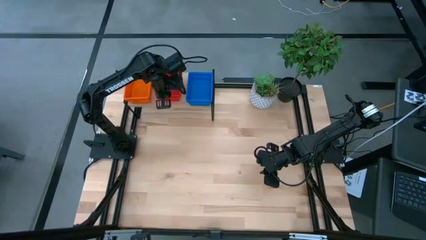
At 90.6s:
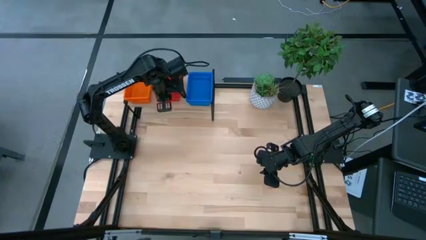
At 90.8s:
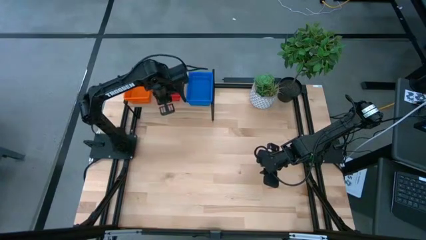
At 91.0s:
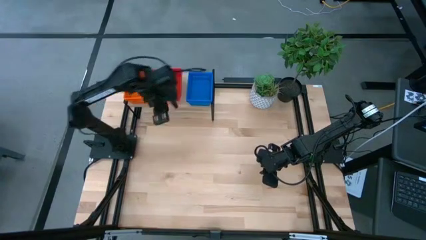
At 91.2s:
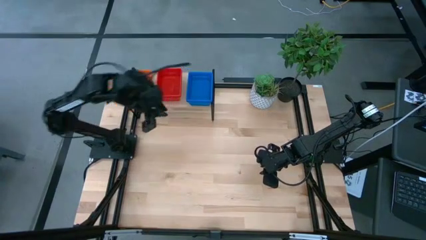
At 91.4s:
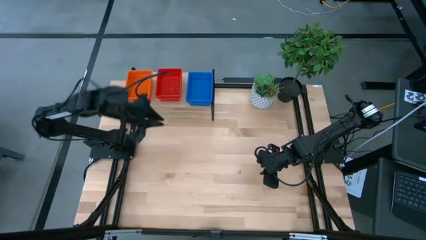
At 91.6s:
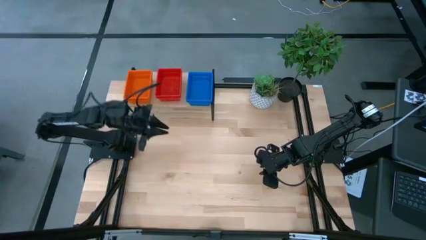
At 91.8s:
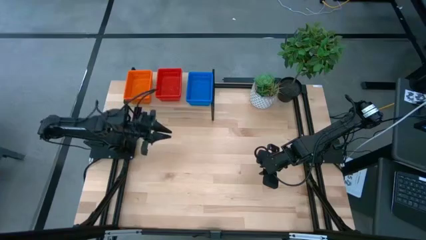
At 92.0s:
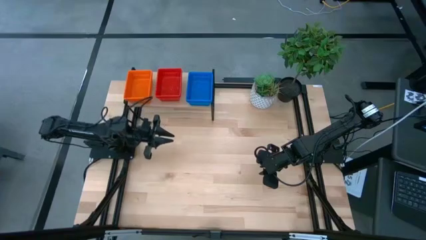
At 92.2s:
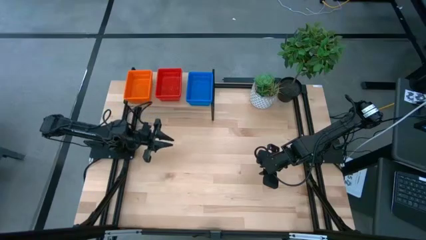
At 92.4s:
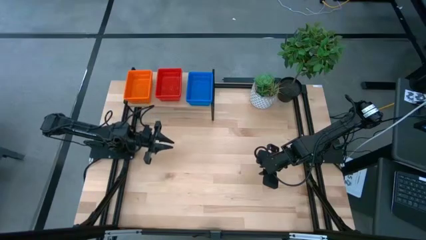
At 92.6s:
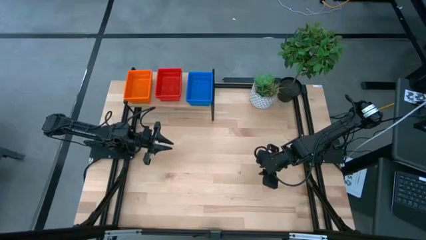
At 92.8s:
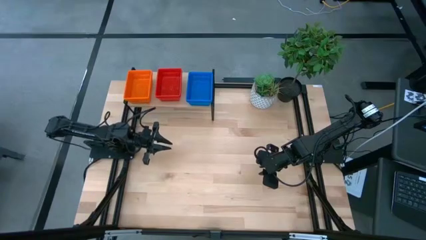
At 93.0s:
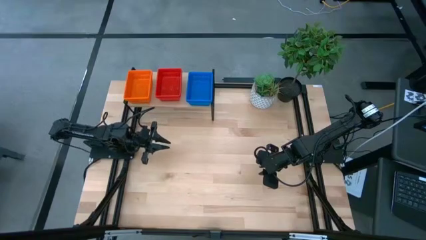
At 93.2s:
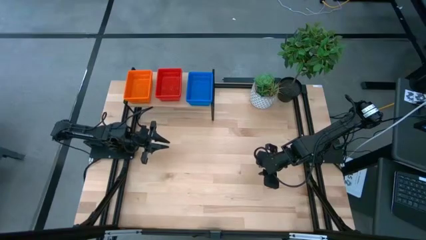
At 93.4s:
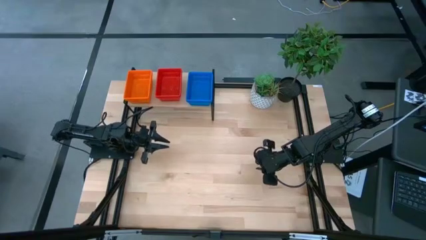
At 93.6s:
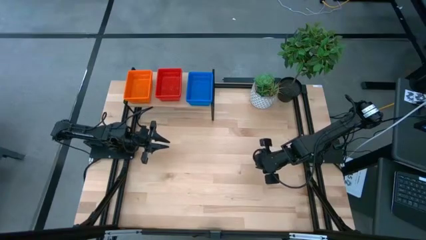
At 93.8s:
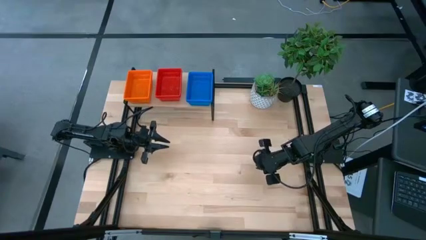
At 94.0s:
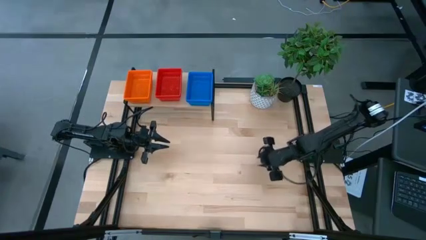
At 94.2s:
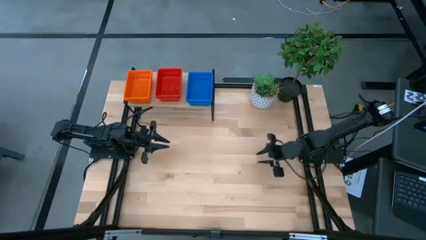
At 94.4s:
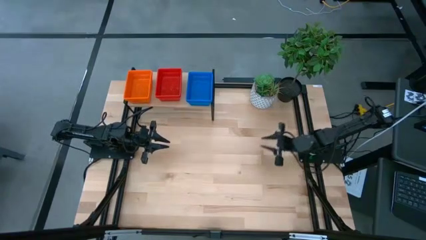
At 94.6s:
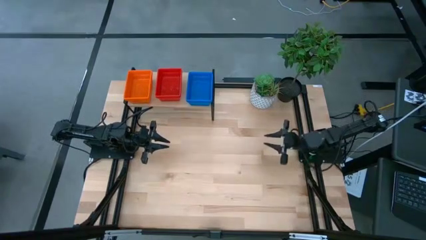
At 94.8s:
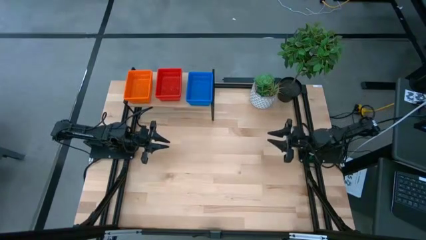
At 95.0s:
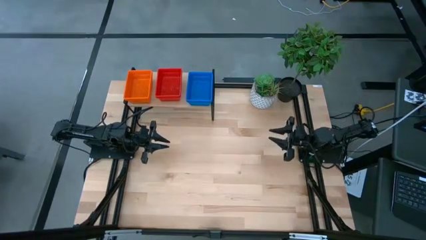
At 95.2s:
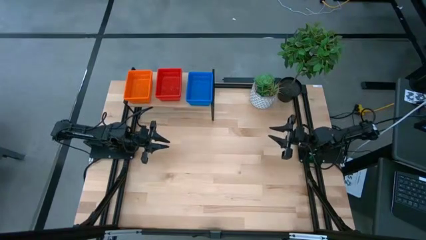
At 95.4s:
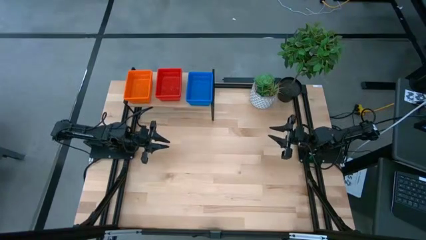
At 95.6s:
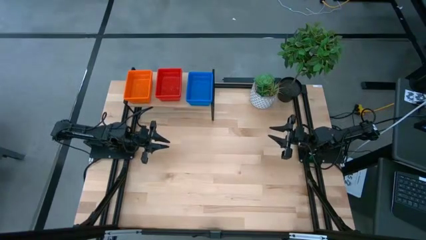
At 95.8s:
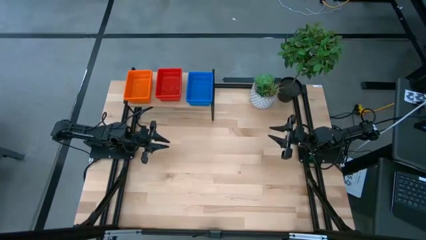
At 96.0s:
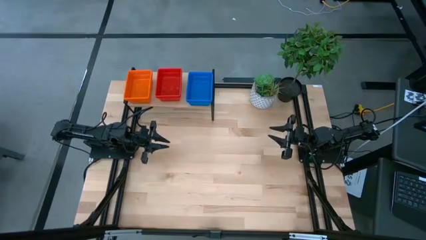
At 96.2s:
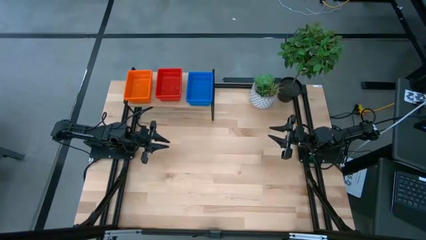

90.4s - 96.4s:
Task: Stack baskets on shelf by color
Return to Home Position

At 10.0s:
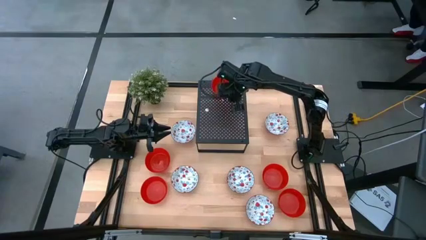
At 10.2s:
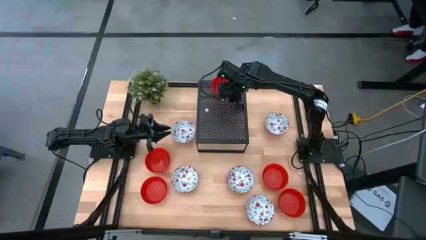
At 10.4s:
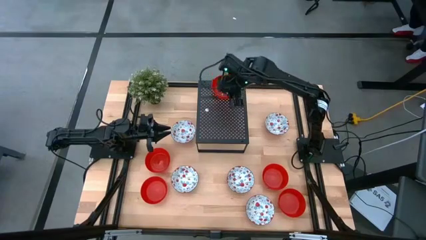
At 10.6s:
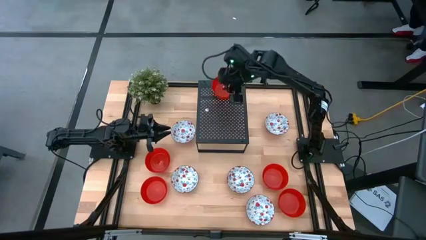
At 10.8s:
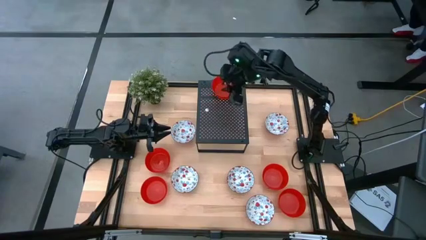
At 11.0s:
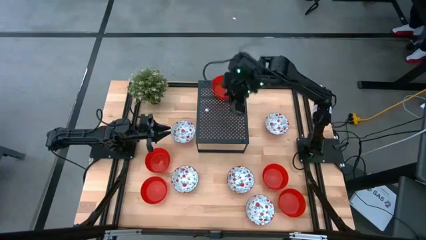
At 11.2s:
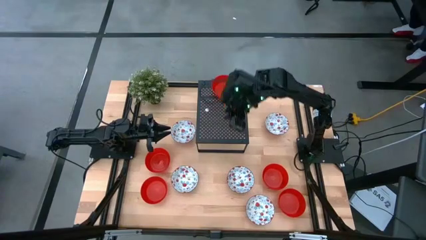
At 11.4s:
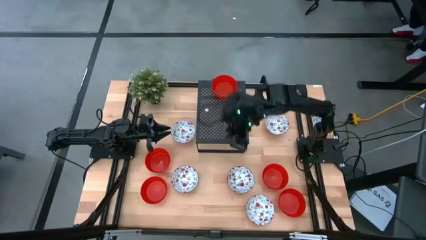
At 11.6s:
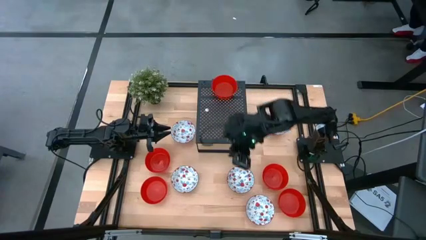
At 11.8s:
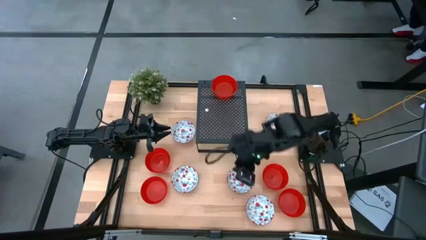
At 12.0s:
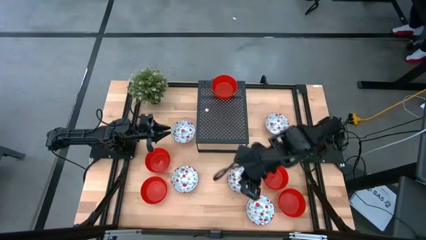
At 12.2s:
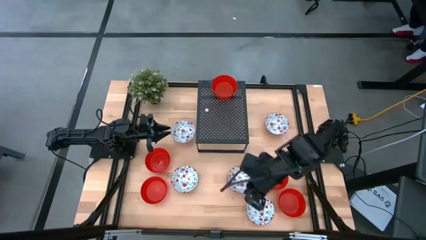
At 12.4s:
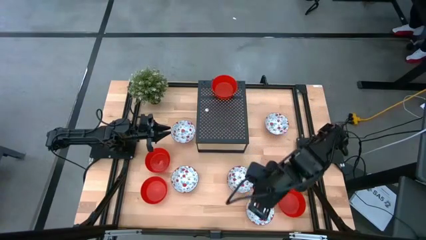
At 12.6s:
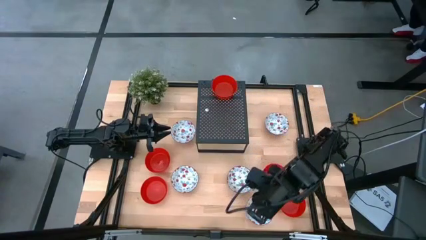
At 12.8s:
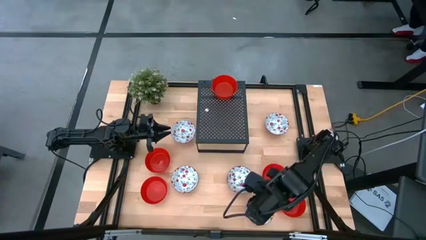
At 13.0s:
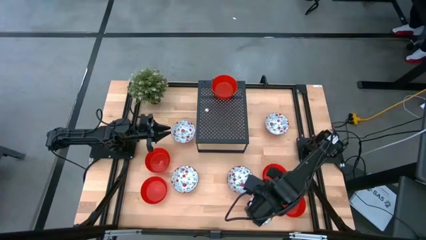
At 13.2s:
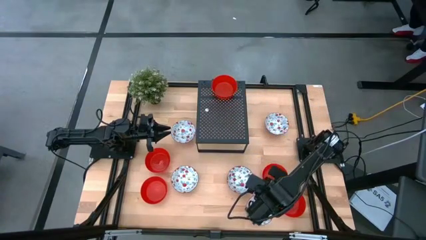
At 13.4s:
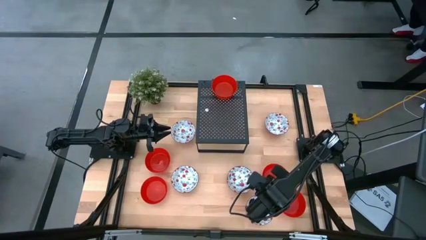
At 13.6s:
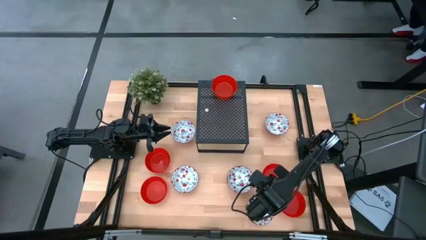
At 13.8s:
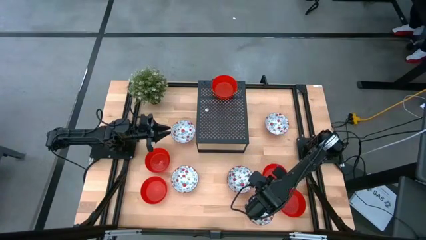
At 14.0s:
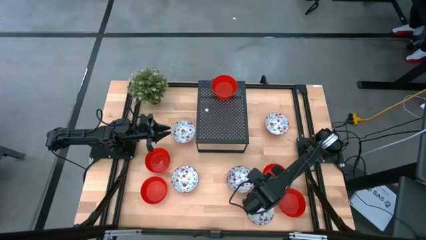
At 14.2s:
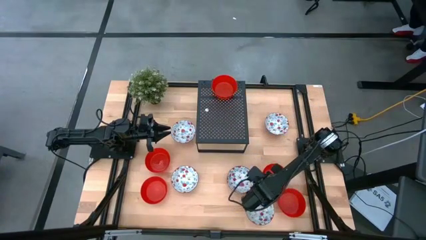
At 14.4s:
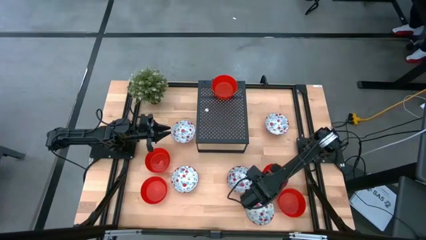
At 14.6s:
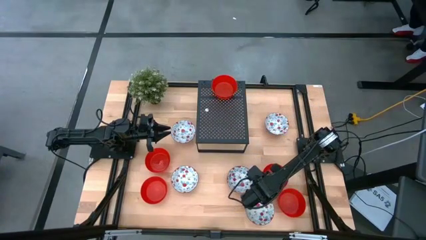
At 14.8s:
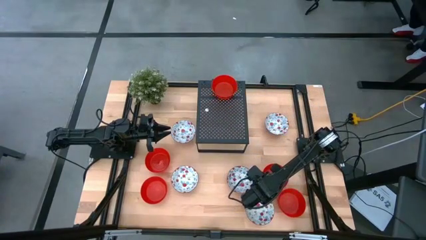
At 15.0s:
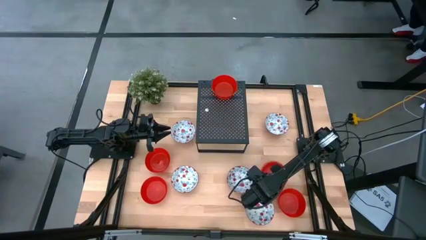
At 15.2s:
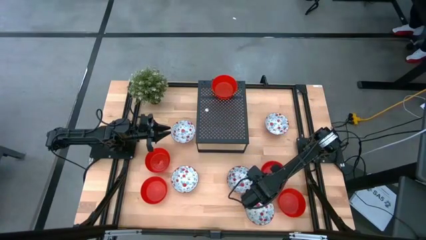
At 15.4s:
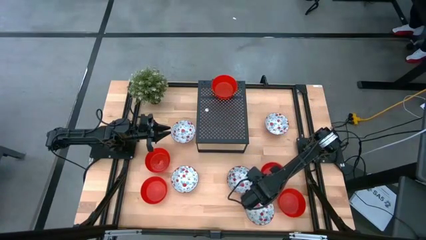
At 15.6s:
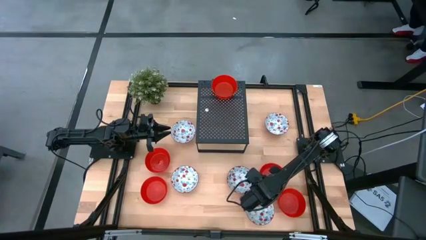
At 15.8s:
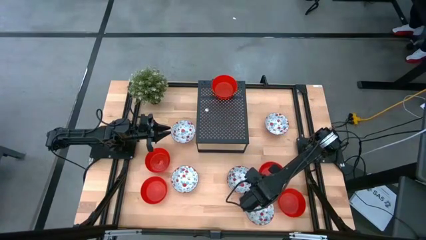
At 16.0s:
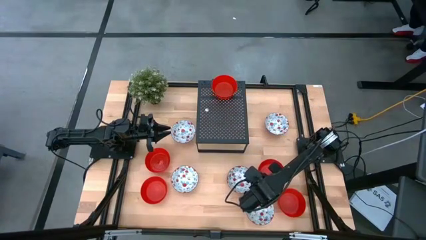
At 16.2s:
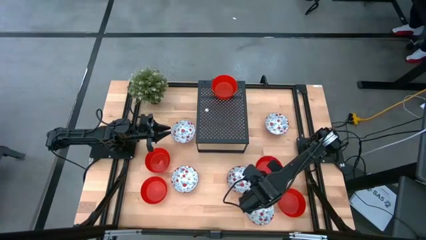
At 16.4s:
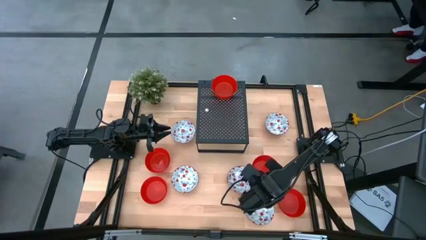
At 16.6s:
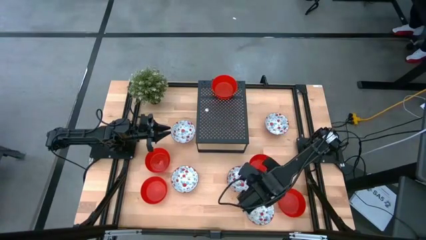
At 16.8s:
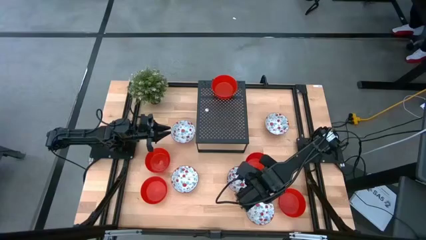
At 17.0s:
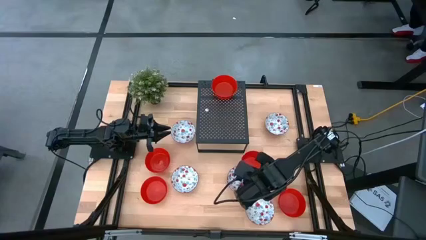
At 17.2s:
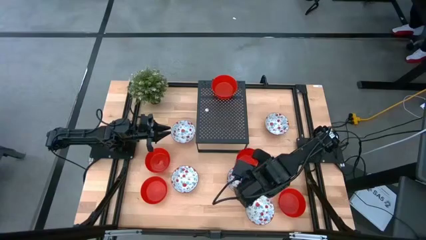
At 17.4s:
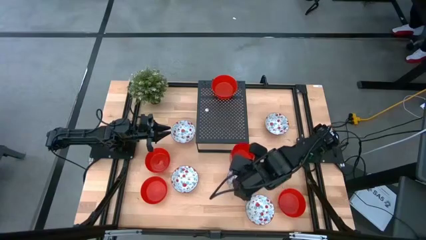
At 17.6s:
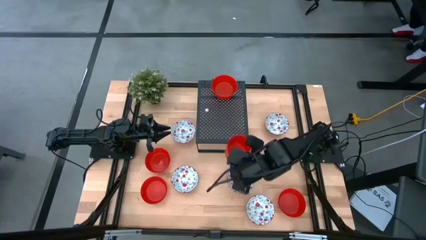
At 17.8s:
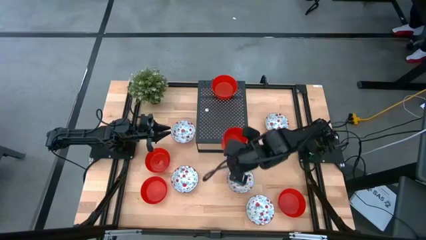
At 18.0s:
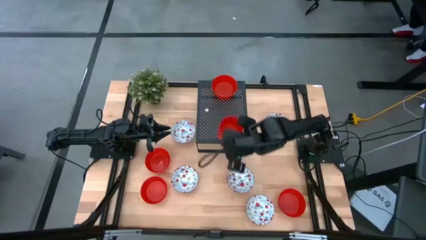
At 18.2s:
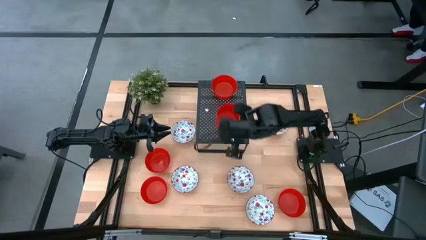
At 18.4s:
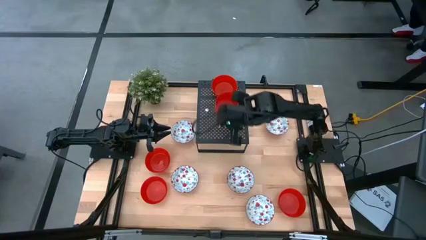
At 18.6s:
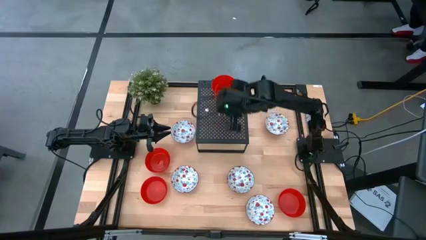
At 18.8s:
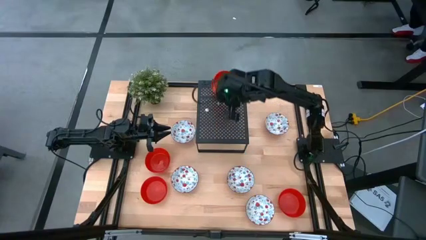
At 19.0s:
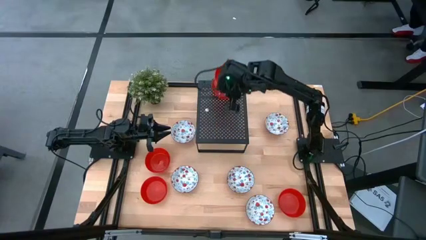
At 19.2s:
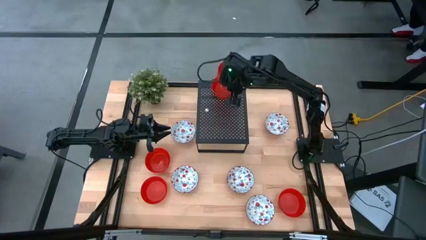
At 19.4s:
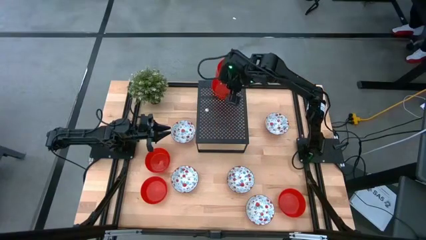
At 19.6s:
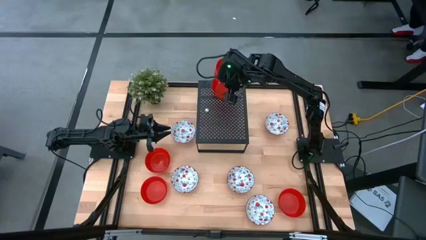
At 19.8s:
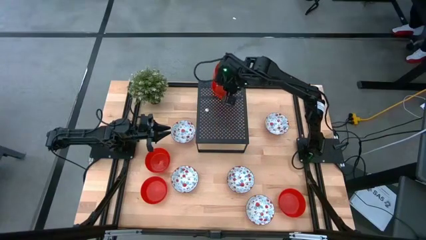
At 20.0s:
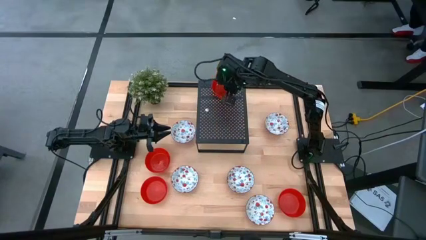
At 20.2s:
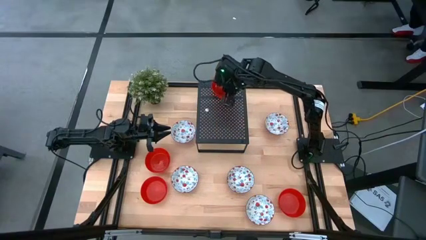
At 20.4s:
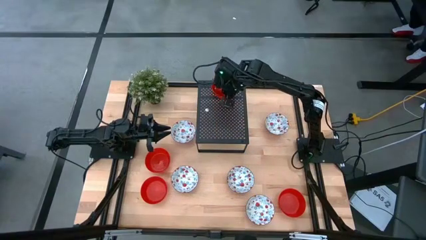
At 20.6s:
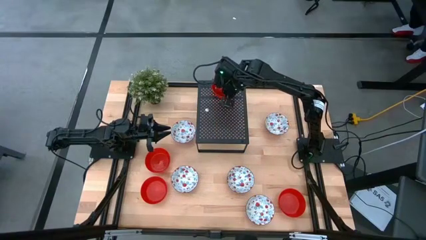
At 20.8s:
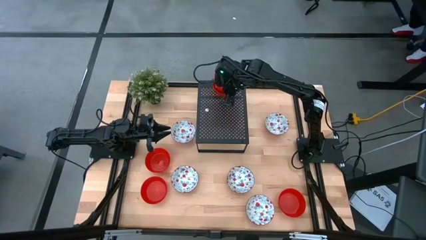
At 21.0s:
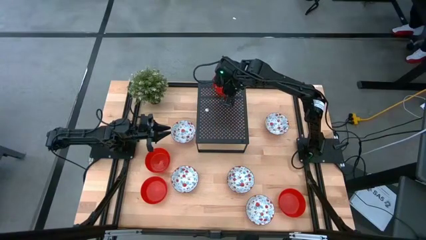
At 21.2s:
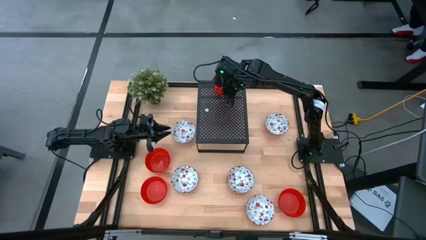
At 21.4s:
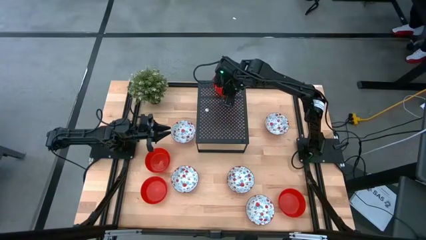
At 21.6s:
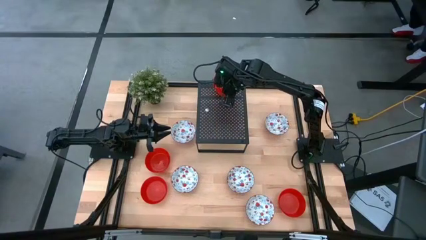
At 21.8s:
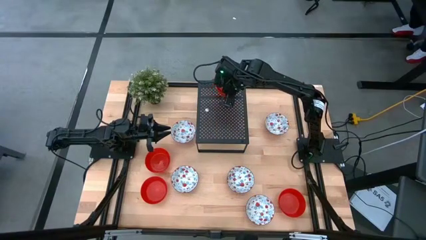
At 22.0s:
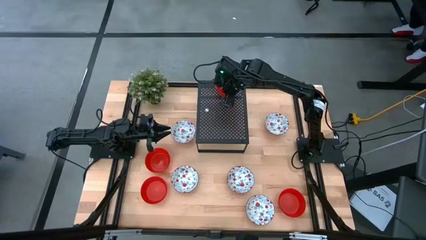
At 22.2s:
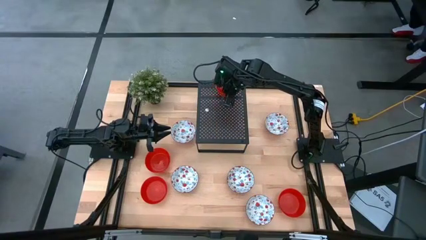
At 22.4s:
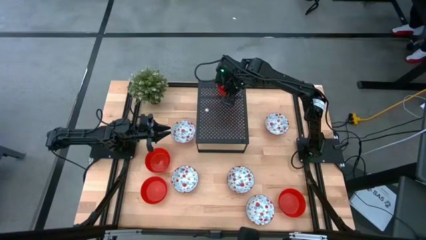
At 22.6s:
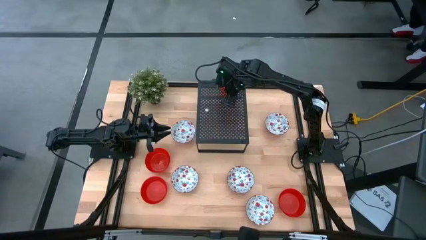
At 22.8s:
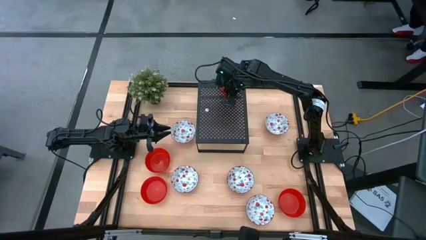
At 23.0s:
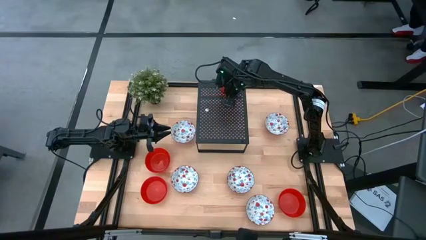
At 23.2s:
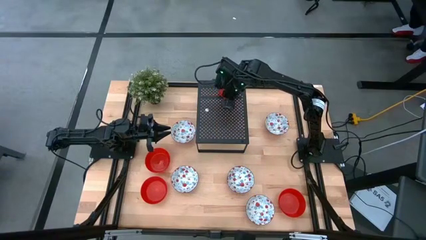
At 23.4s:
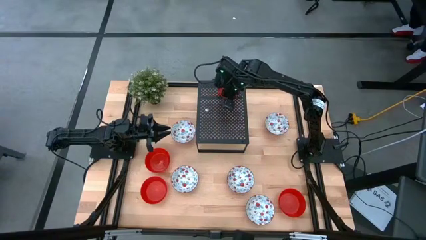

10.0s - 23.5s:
Task: Pick & Place Mini bowls
Stack the red bowl on top of the other red bowl on the shelf
